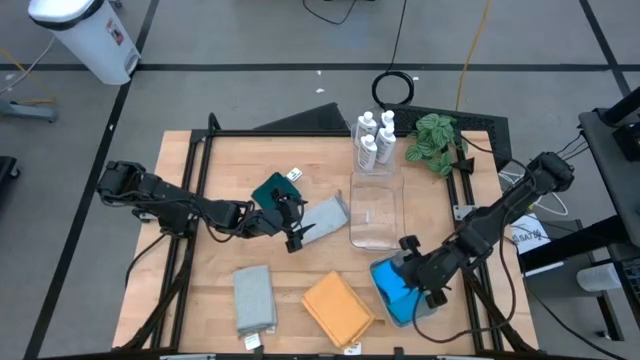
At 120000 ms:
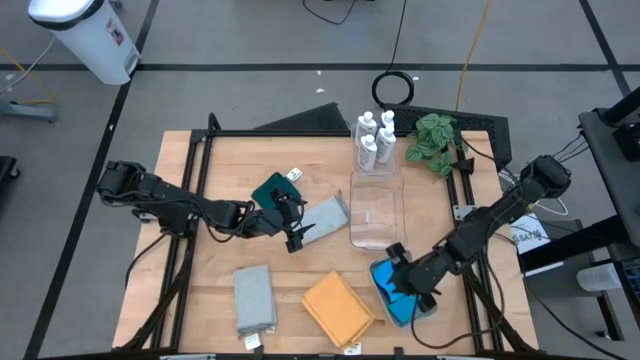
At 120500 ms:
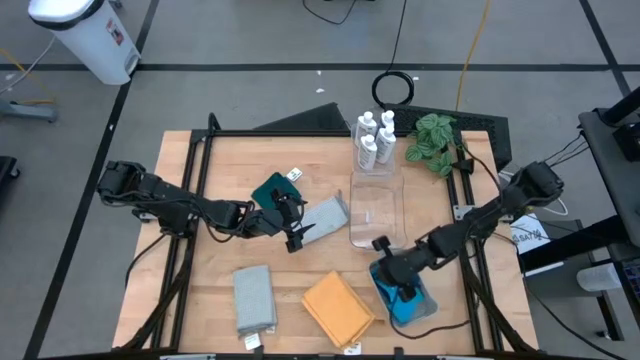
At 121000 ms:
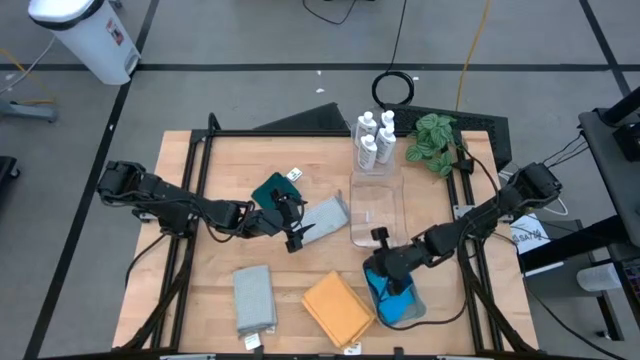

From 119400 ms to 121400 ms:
Task: Pick & Place Kitchen Items
Adjust the gray bin

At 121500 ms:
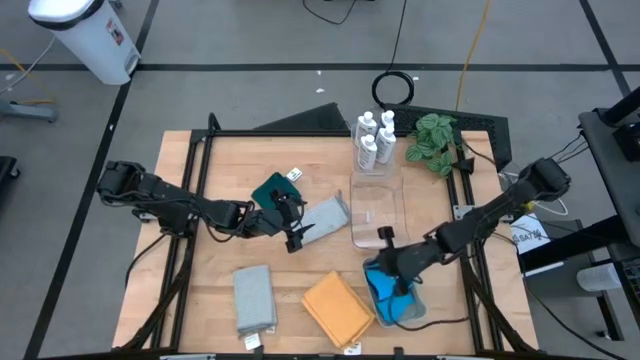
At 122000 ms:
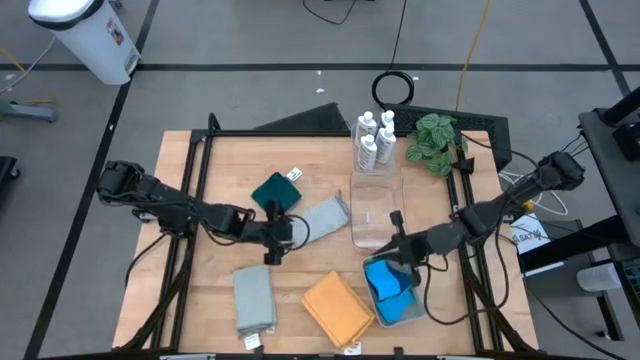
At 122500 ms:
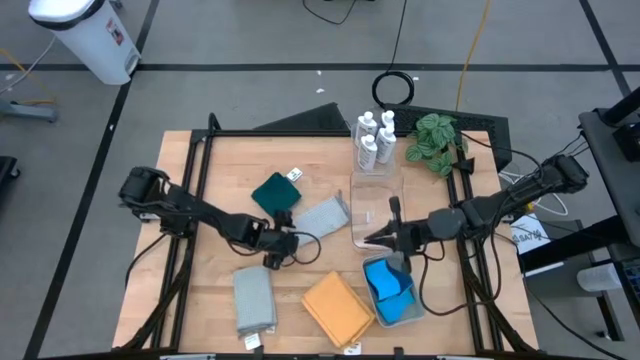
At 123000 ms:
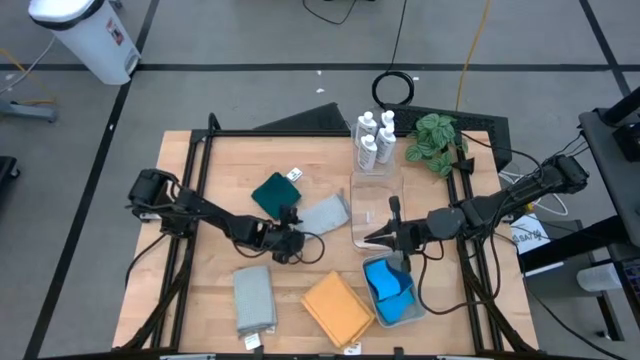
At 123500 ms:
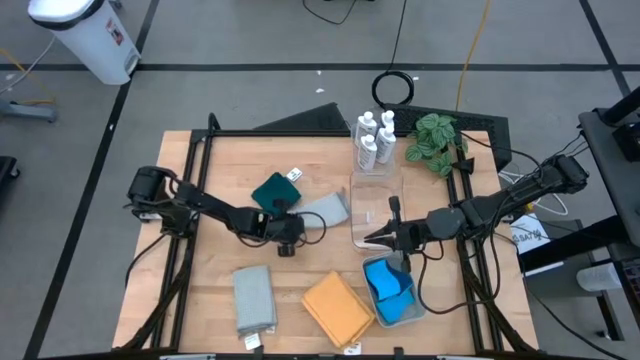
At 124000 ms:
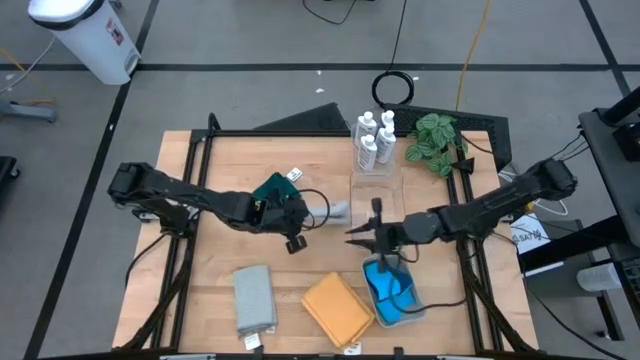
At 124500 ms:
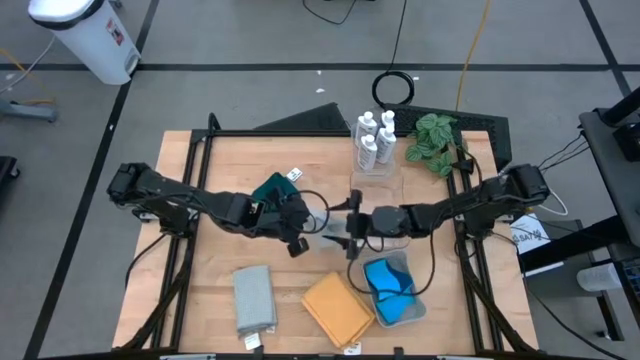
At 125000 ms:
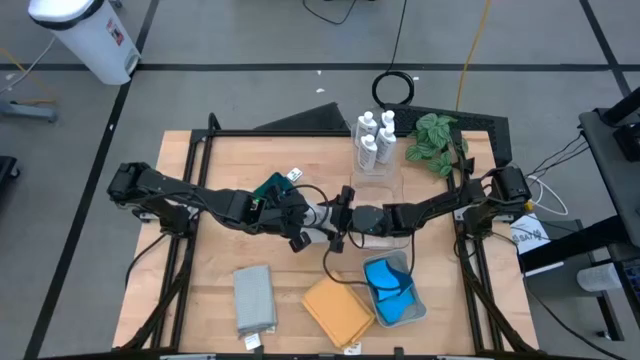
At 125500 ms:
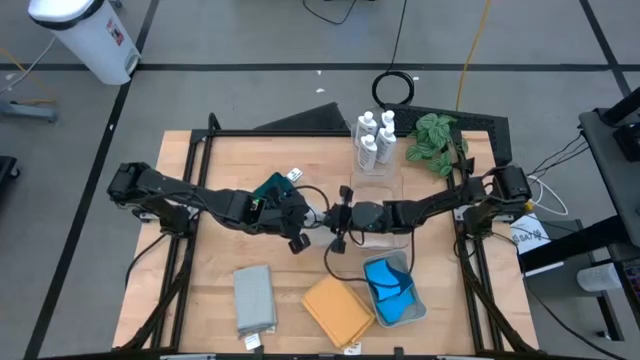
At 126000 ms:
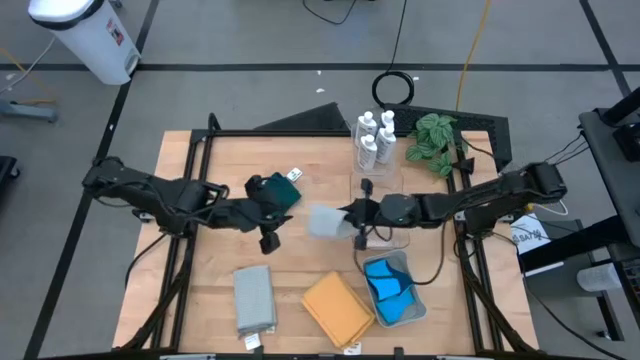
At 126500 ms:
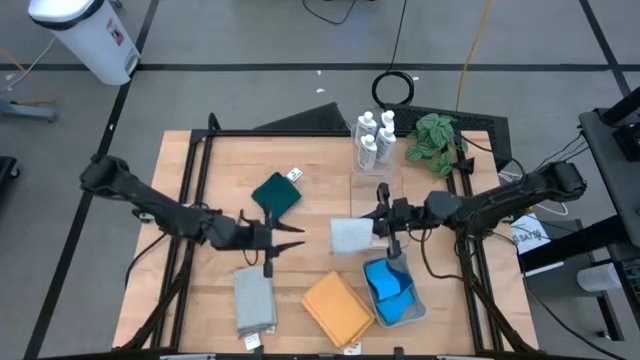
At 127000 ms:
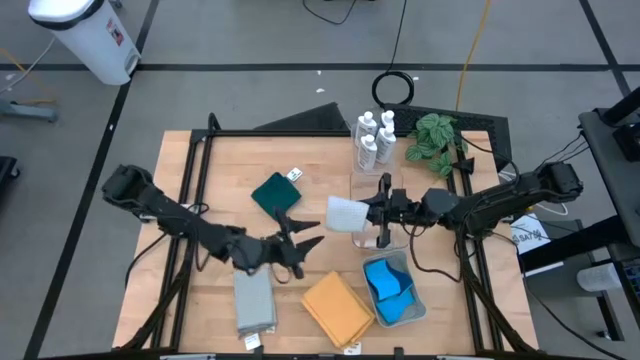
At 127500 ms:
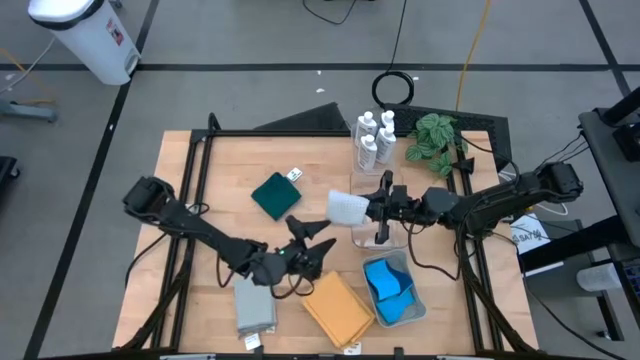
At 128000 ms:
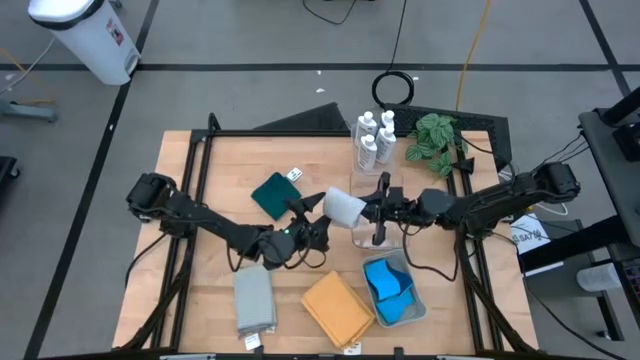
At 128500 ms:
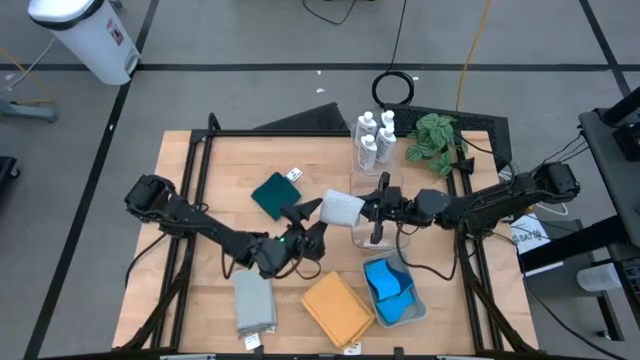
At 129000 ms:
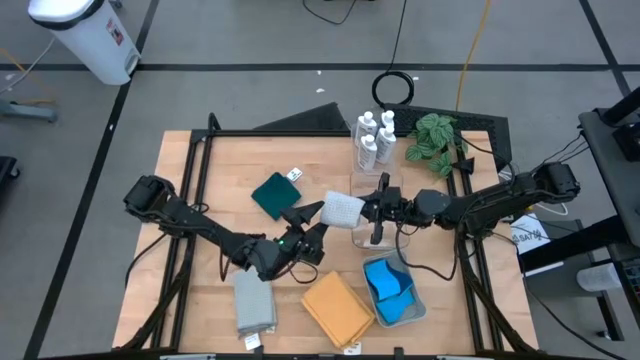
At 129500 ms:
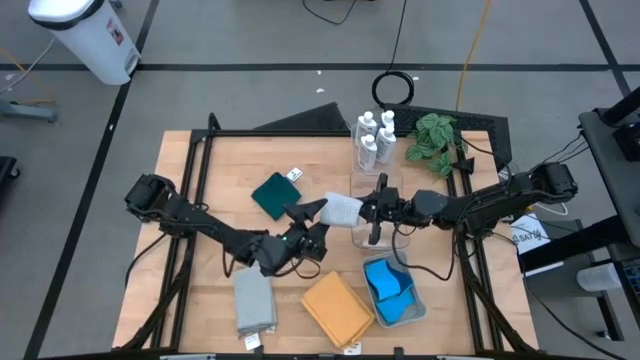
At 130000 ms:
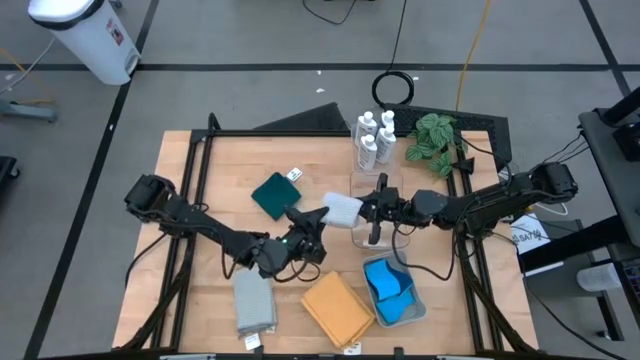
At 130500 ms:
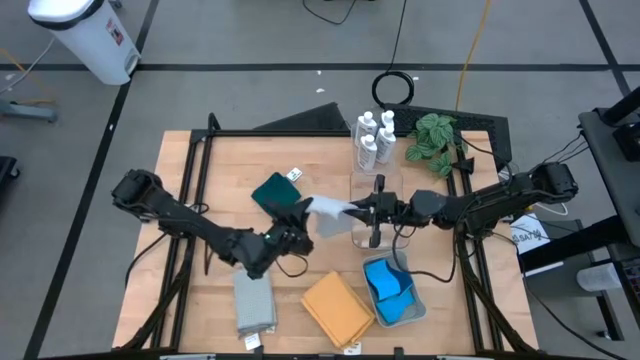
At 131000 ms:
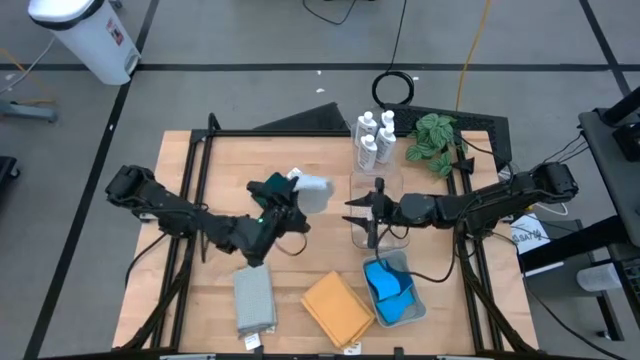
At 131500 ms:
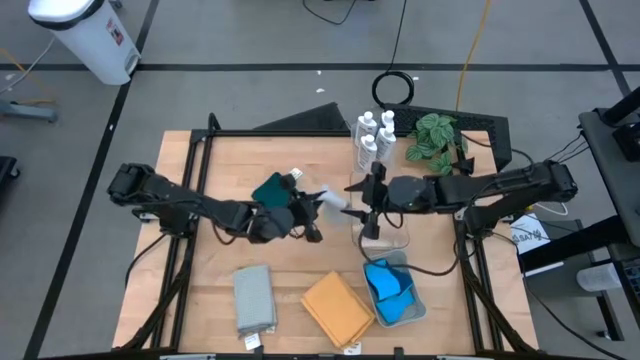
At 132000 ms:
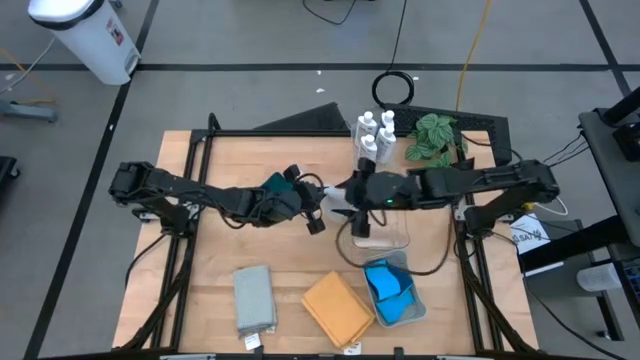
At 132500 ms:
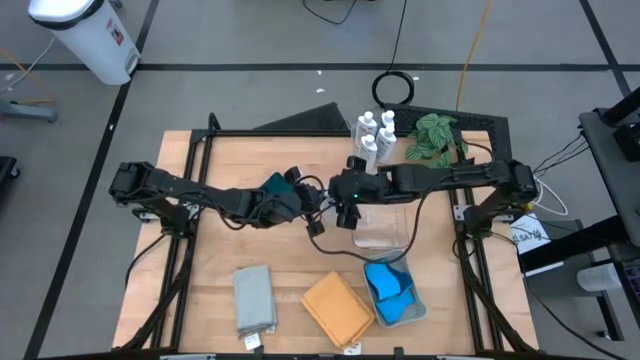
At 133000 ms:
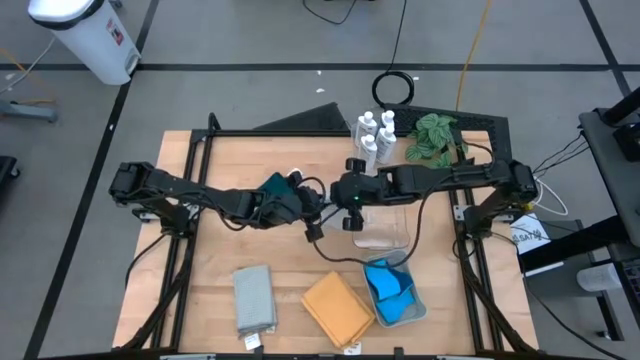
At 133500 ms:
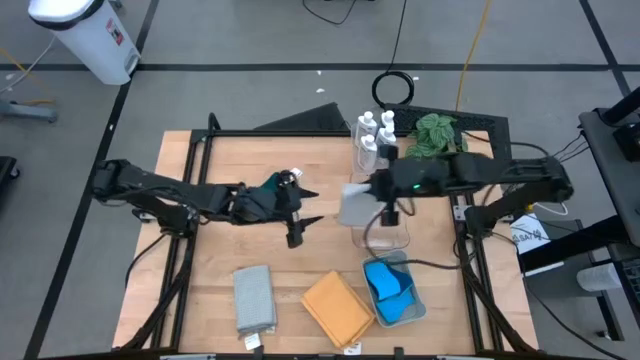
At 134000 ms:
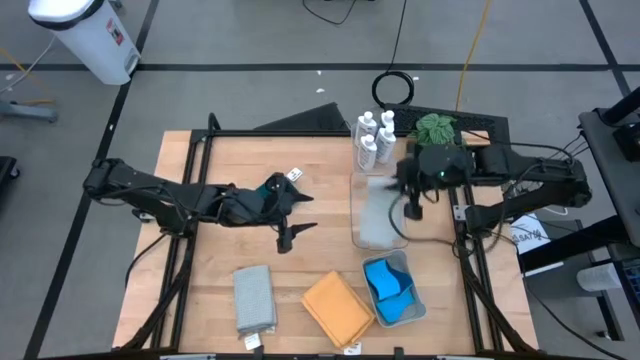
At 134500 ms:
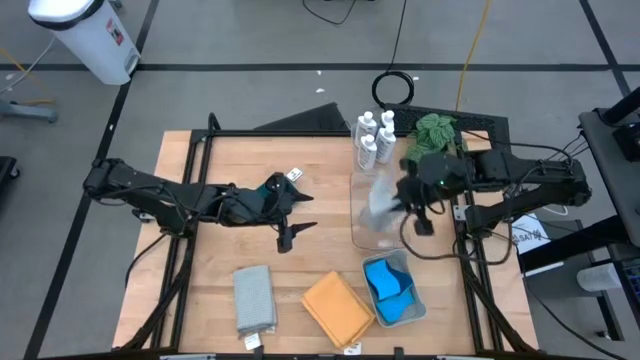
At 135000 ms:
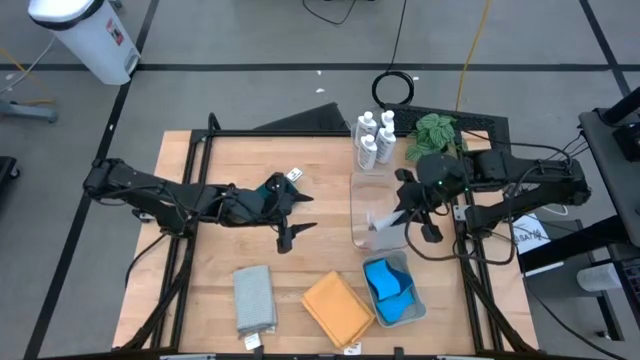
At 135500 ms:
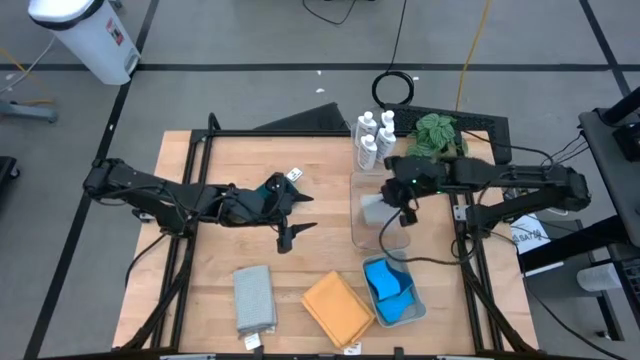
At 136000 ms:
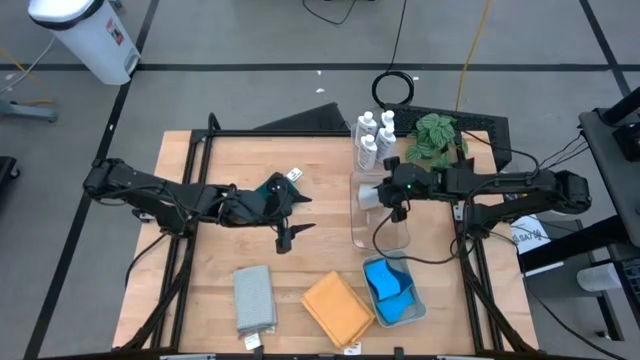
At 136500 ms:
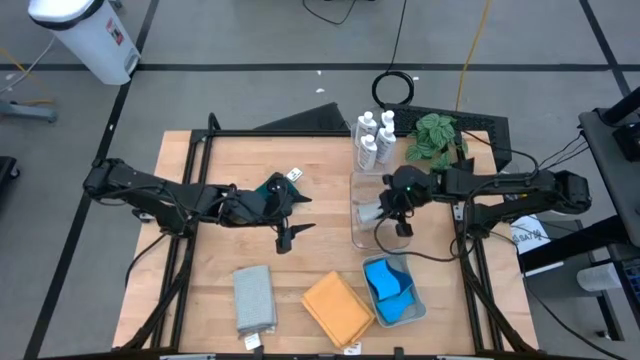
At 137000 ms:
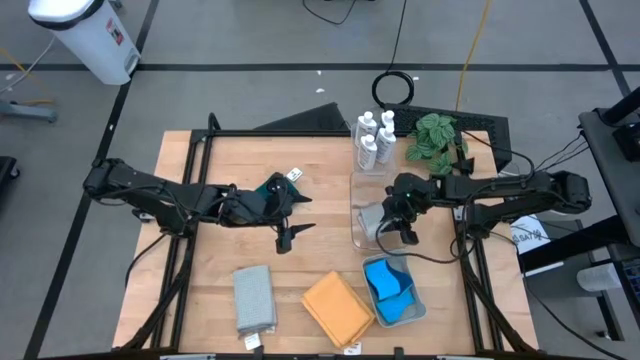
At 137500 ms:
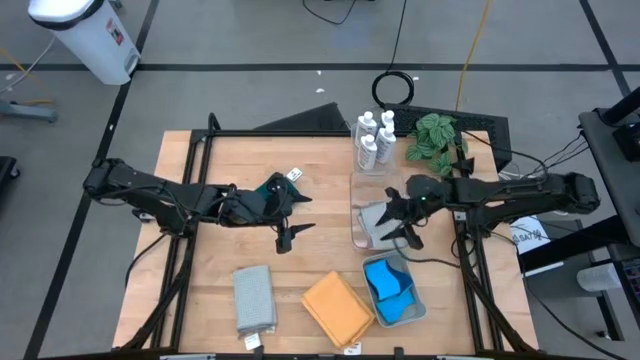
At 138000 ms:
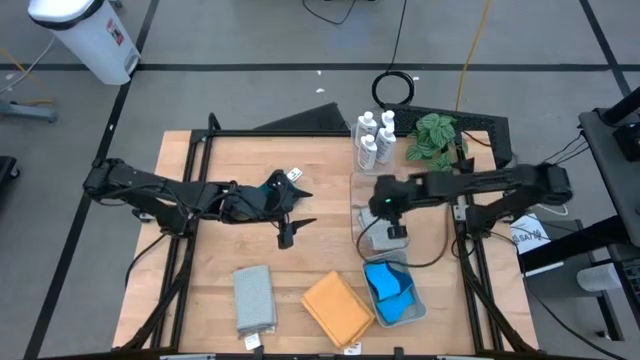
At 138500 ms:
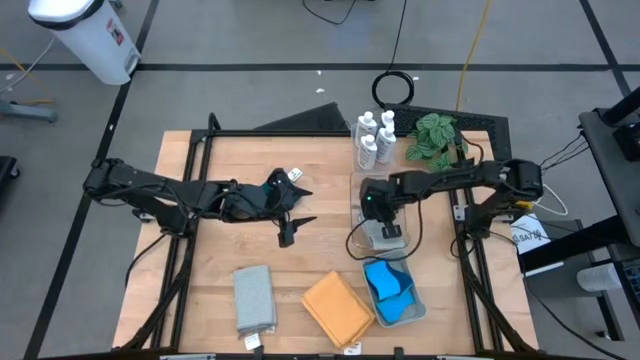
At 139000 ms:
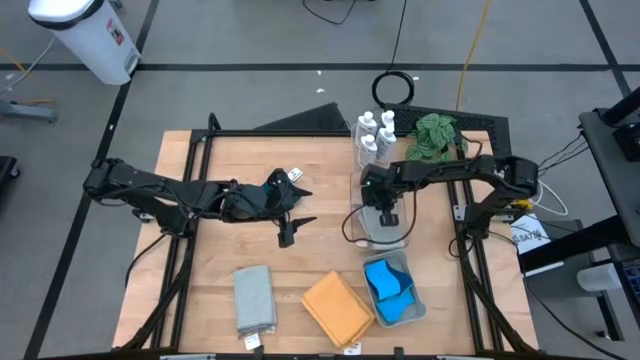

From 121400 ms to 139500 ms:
Put the gray towel into the bottom transparent bin

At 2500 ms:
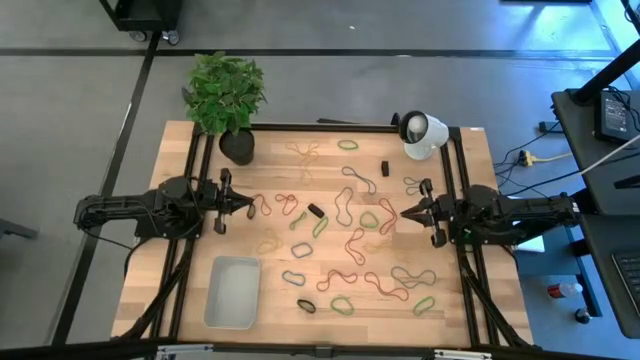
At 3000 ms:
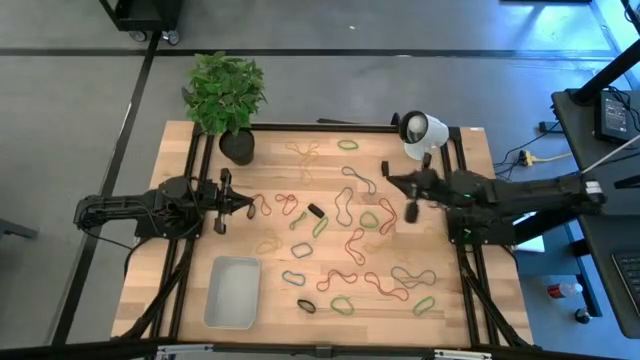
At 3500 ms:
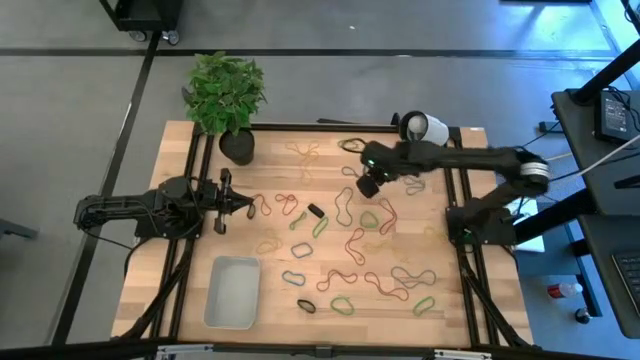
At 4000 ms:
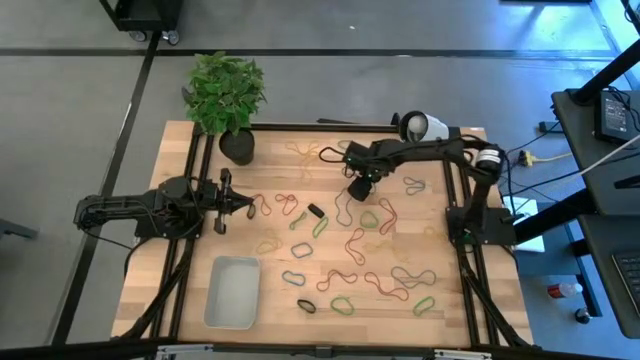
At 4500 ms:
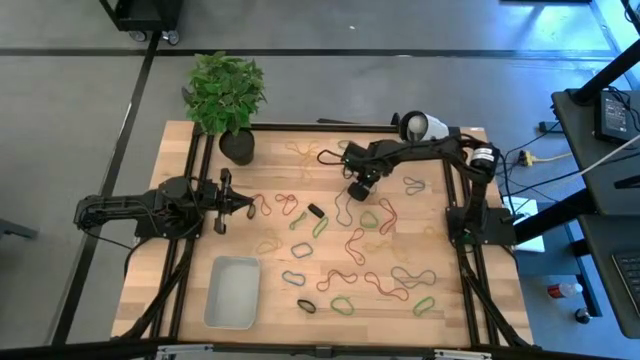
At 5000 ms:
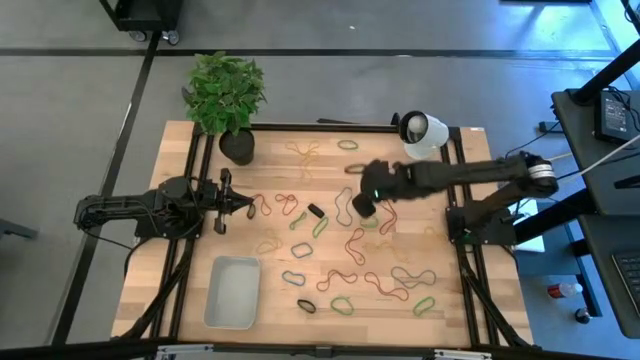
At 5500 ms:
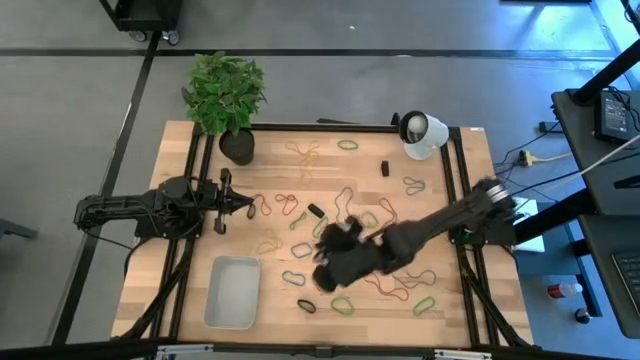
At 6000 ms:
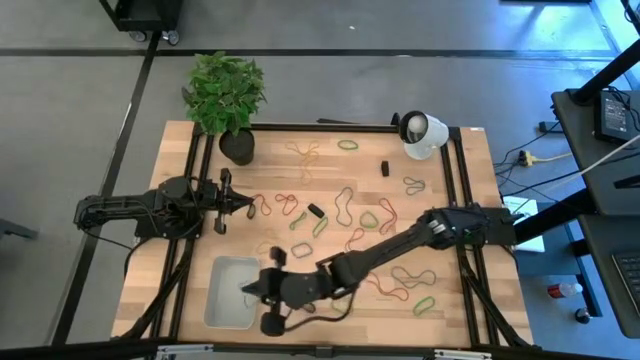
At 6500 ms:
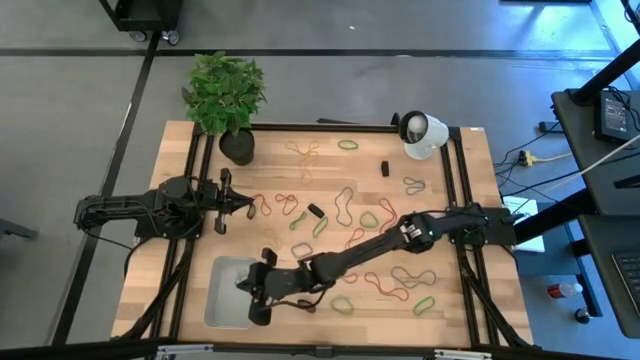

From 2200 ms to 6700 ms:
Task: Pick and place rubber bands into bin
Put the blue rubber band into the bin
